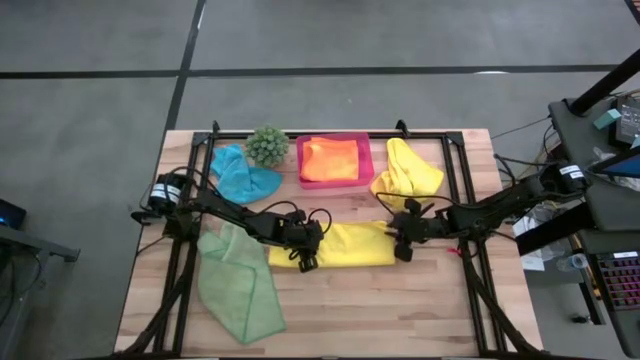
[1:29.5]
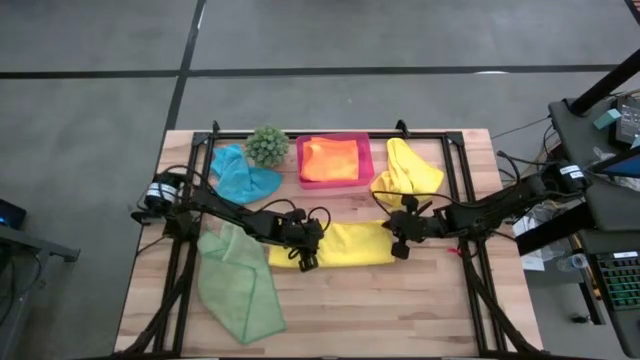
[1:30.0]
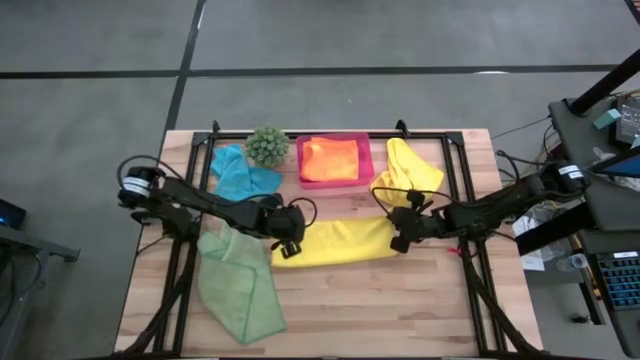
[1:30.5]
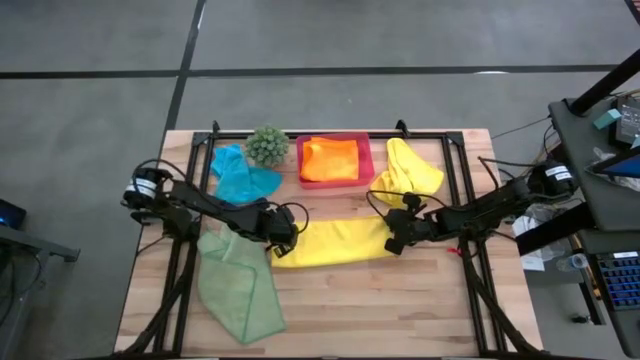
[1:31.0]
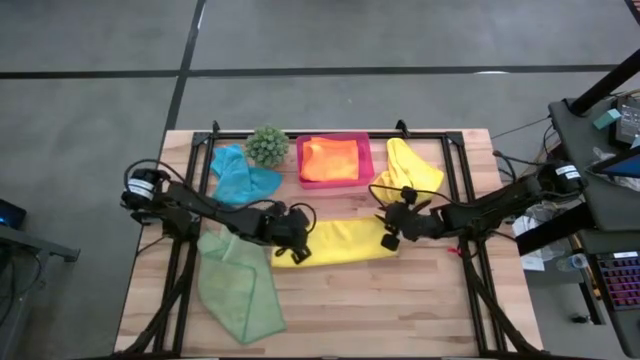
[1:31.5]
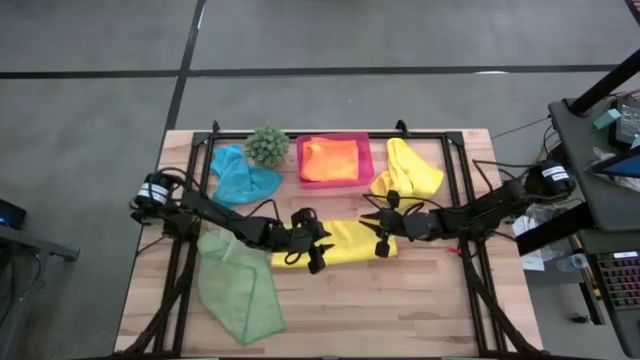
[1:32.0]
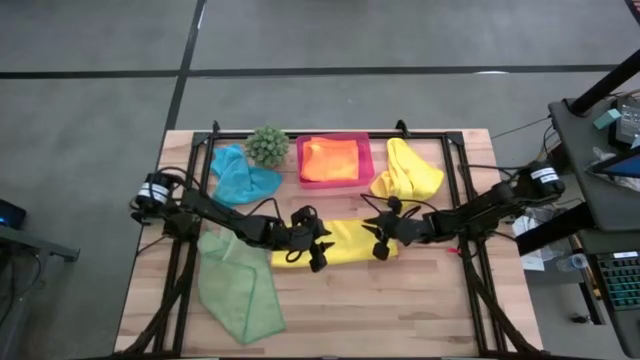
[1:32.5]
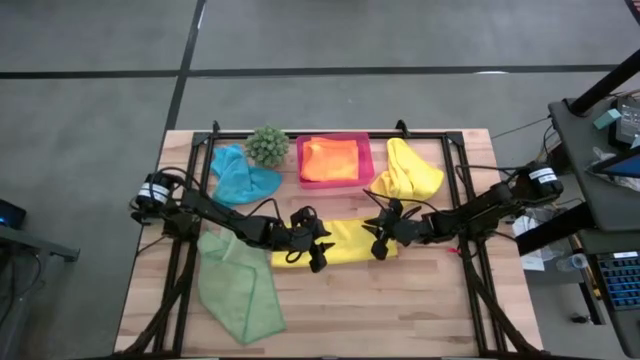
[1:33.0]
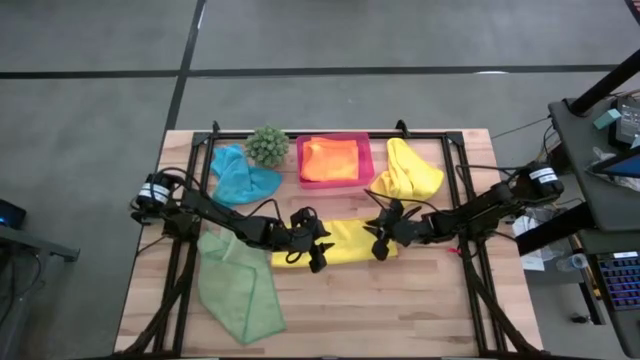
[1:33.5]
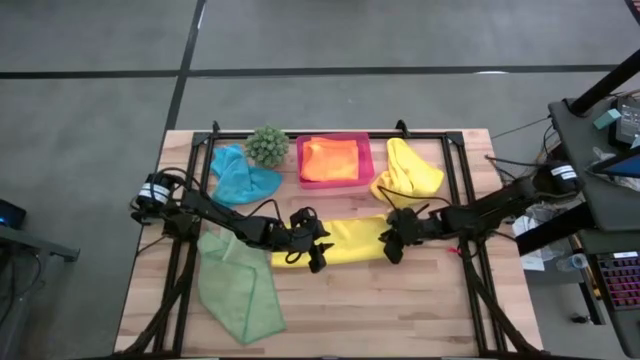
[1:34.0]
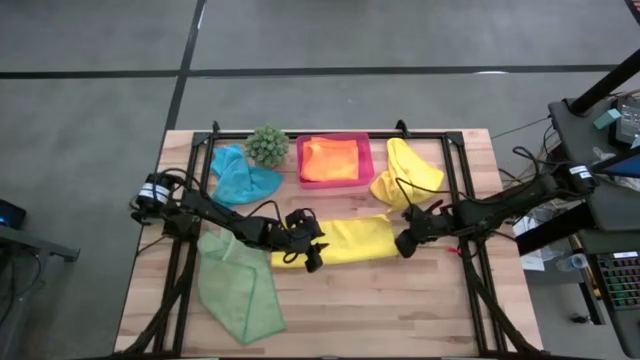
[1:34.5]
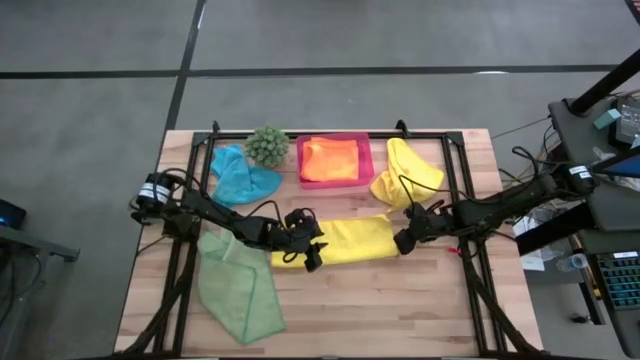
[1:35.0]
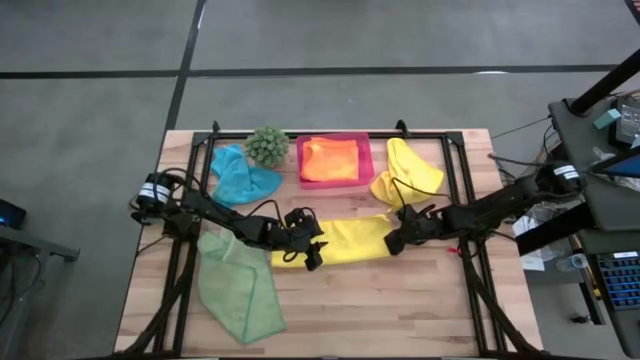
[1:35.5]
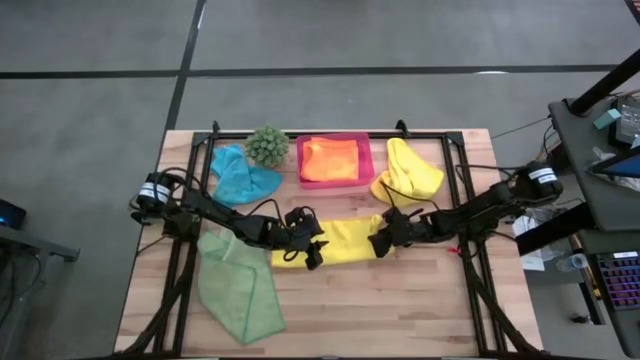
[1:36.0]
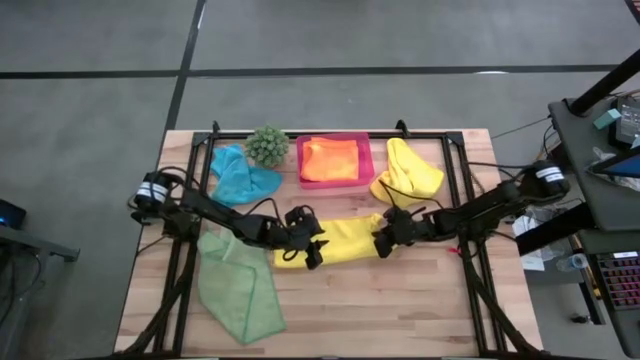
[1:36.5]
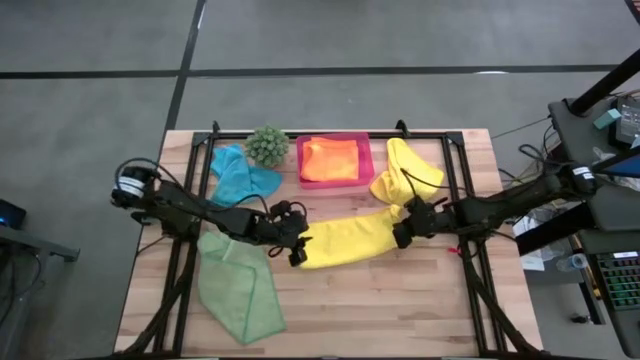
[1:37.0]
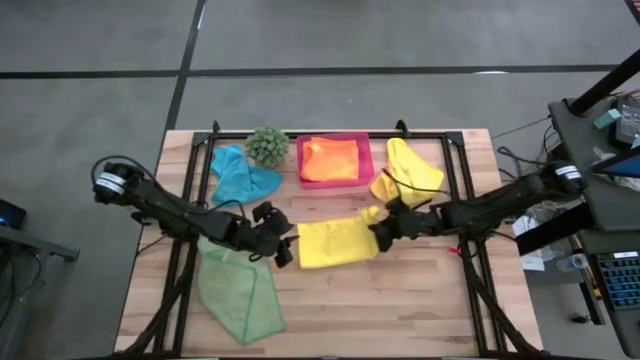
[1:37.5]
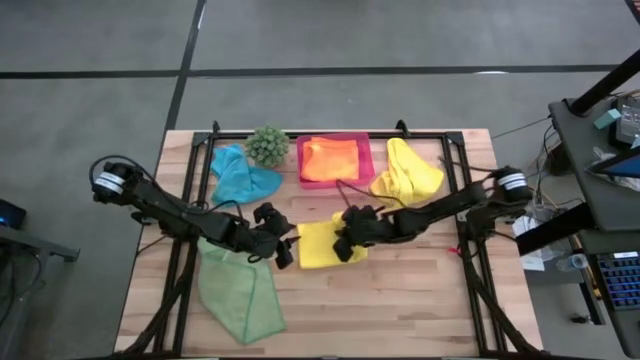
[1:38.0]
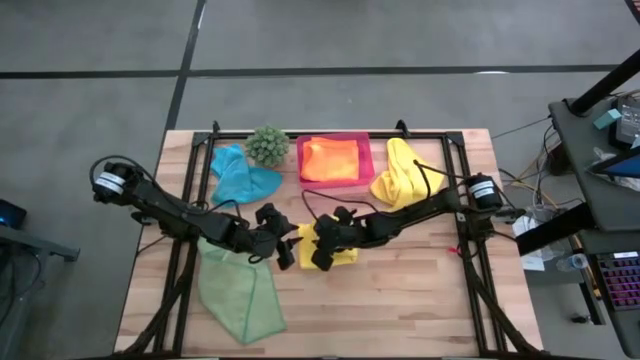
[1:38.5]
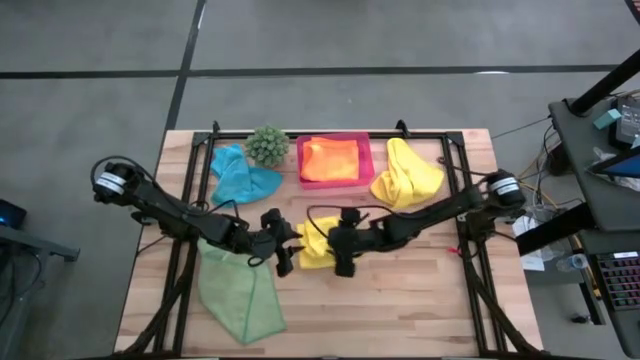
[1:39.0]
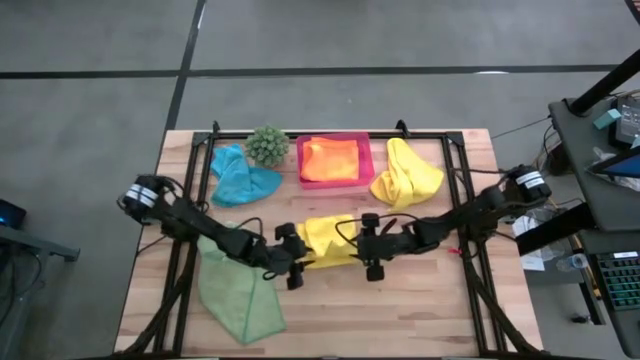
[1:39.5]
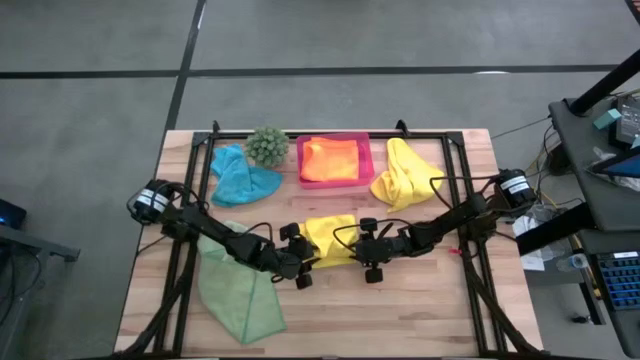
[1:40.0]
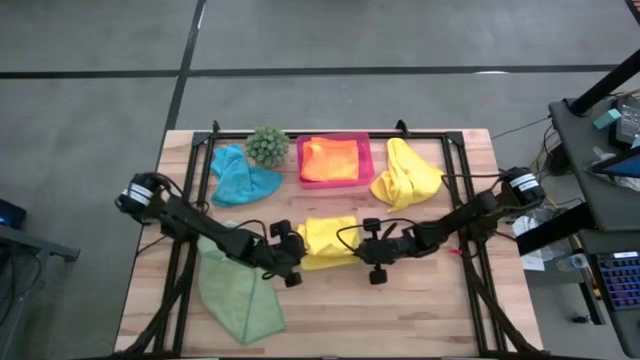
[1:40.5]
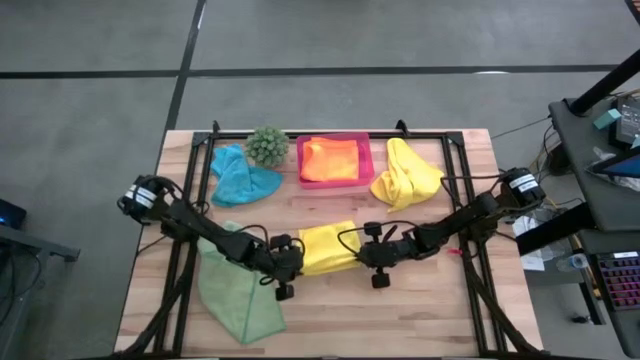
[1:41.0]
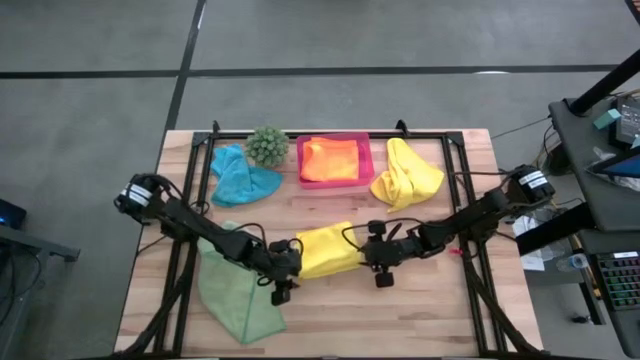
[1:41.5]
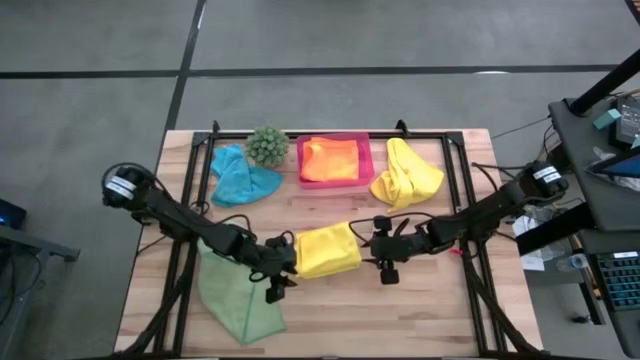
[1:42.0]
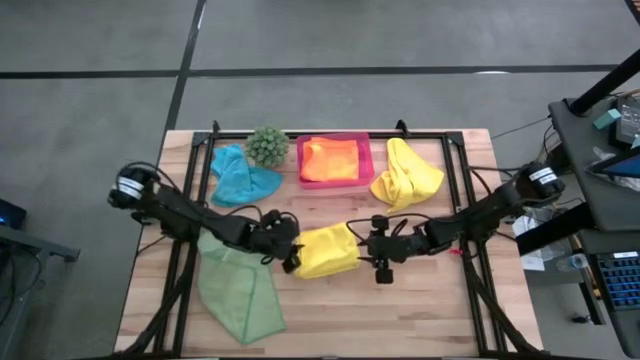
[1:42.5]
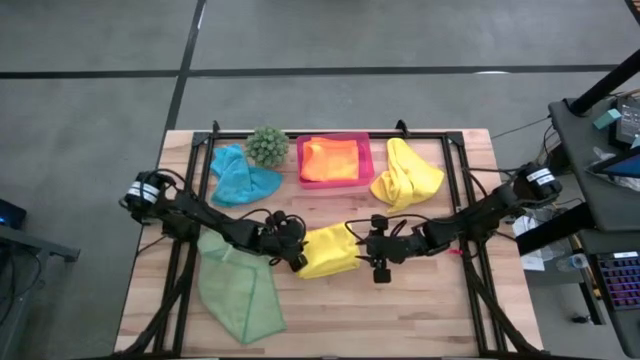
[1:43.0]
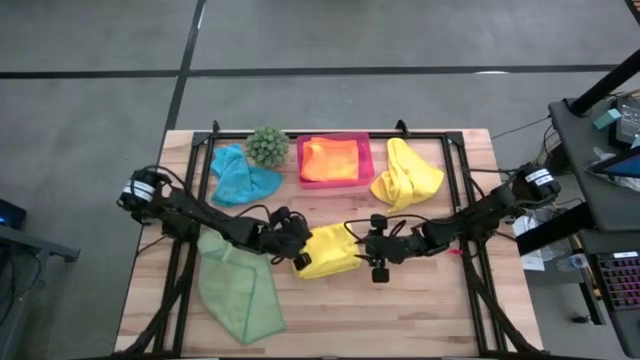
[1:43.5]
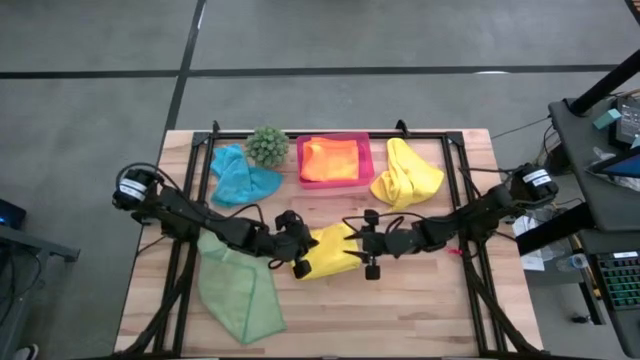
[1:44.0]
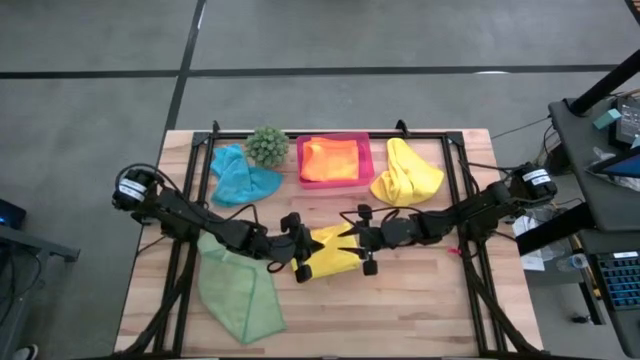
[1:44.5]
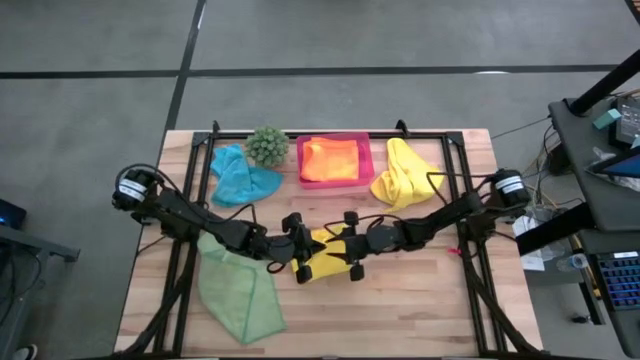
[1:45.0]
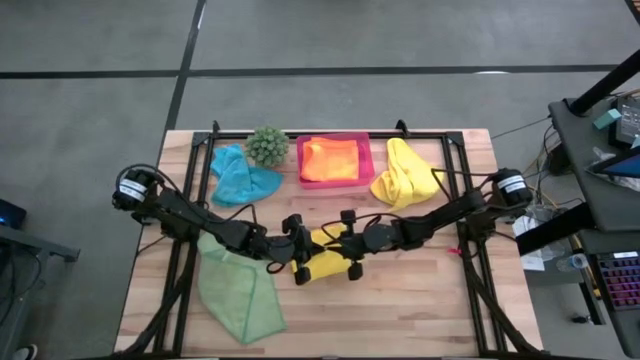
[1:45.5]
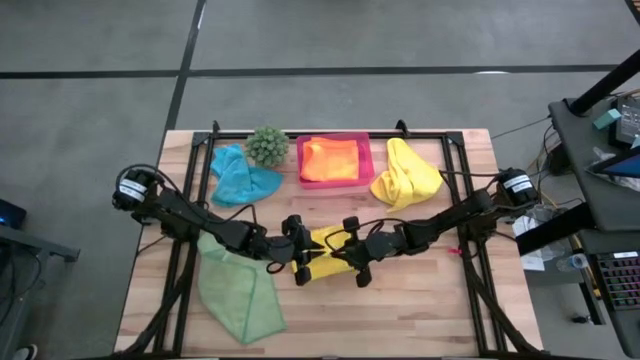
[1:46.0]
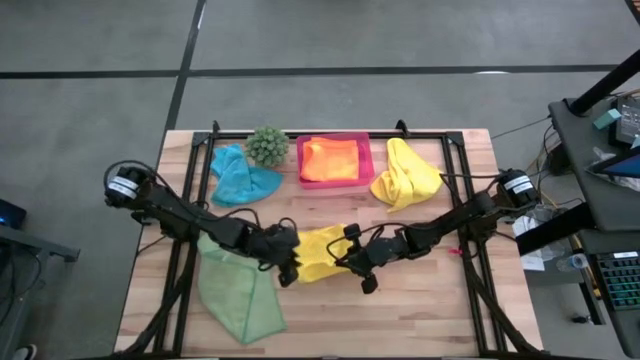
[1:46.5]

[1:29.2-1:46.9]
Task: Fold microfiber towels
Fold the bottom yellow microfiber towel

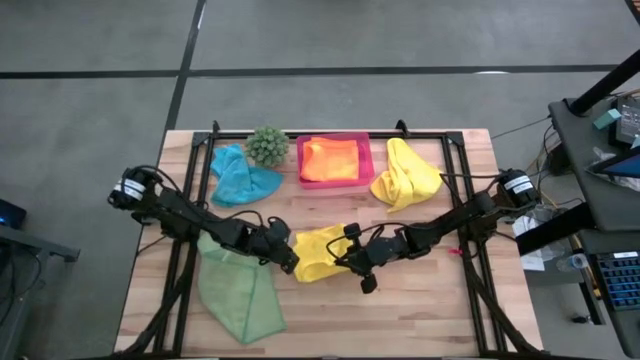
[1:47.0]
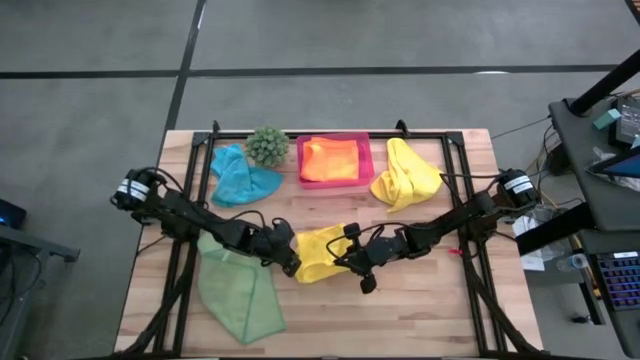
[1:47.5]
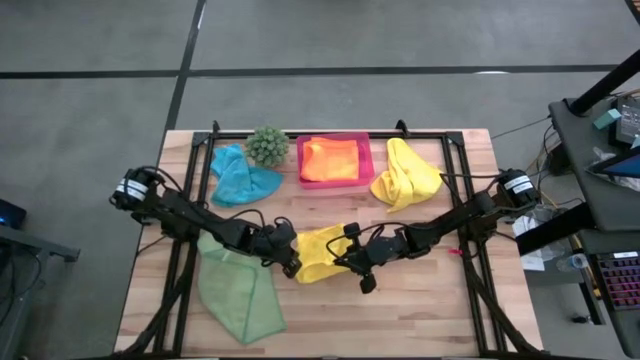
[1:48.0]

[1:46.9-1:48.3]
Fold the bottom yellow microfiber towel
